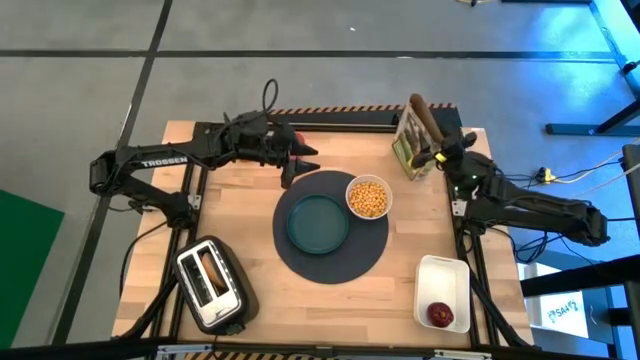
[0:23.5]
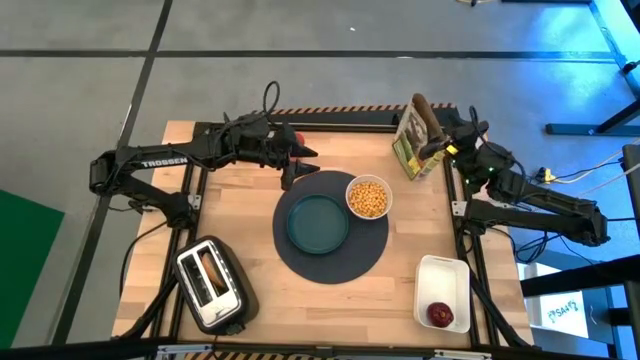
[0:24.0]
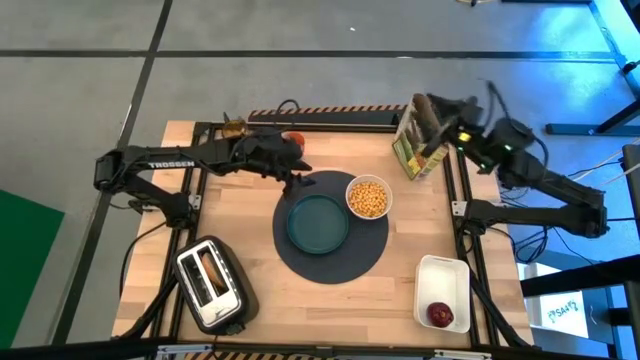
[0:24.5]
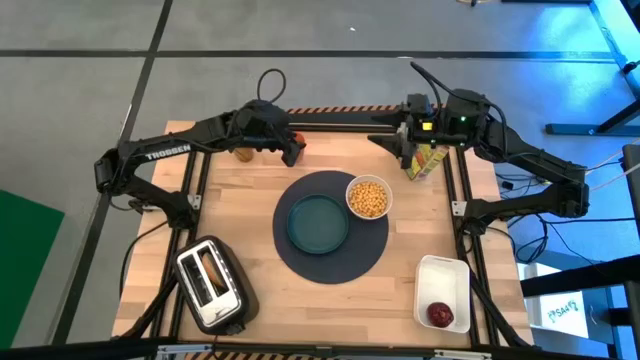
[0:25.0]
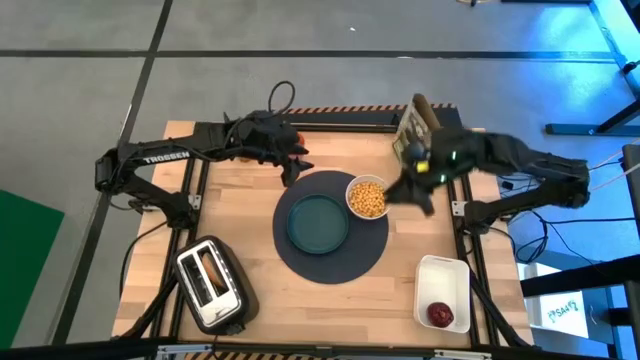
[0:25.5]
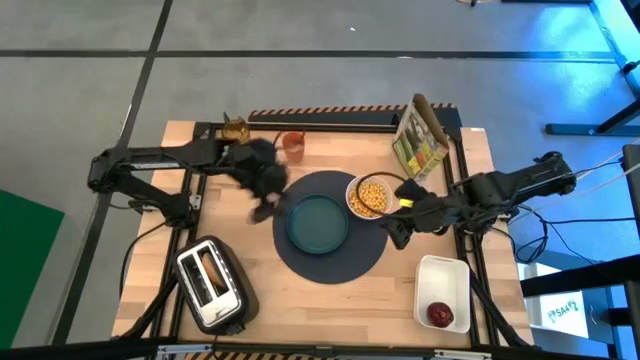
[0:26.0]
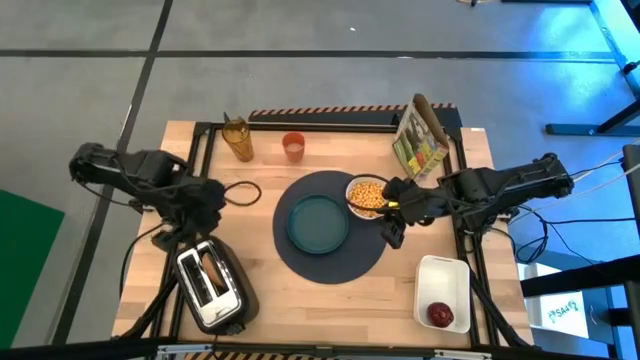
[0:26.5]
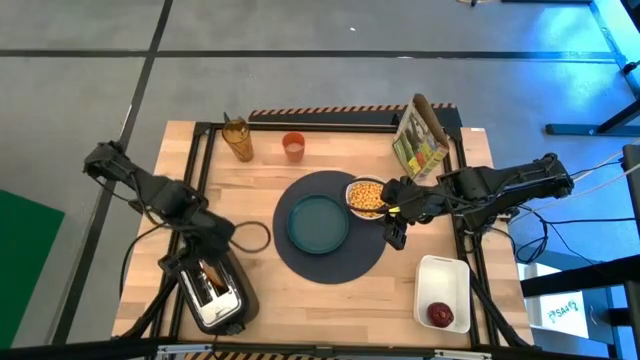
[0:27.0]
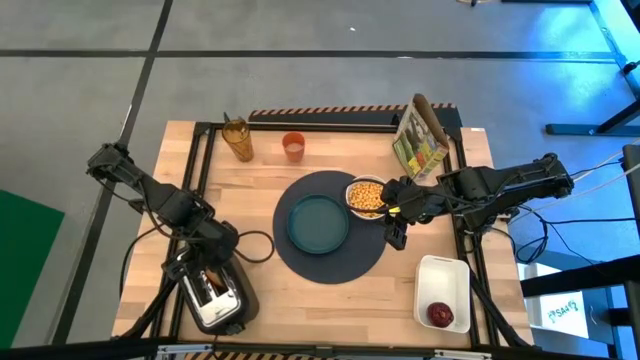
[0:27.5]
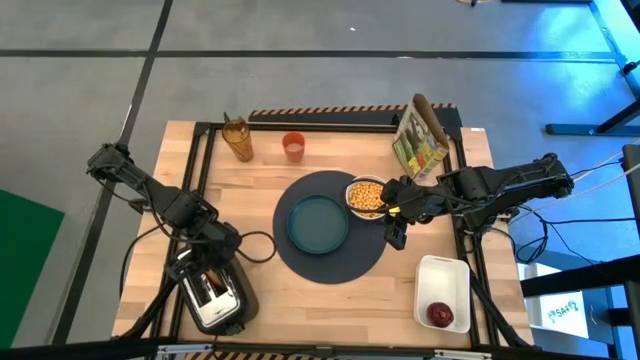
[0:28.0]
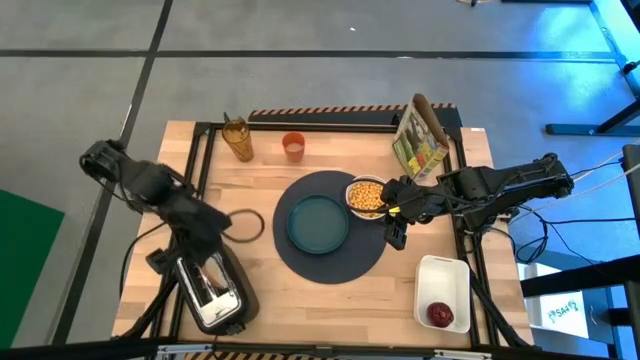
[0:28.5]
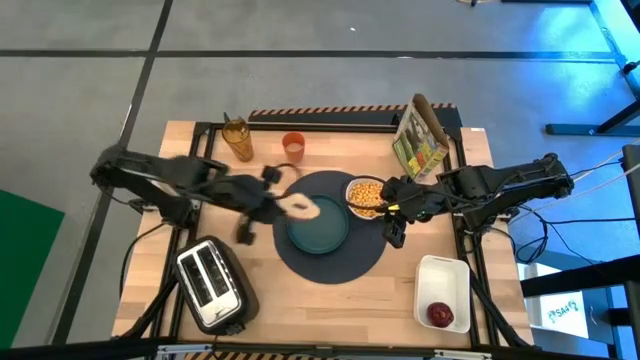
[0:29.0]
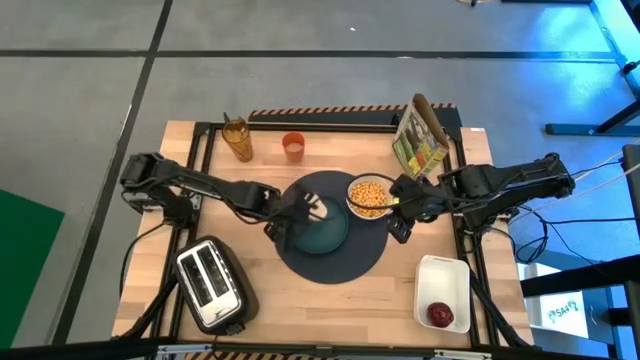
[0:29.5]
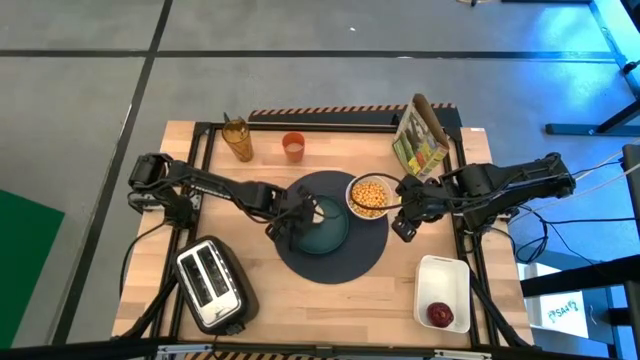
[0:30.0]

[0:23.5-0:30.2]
Task: Arrange a breakfast setting
Put the toasted bagel from the toaster on the green plate

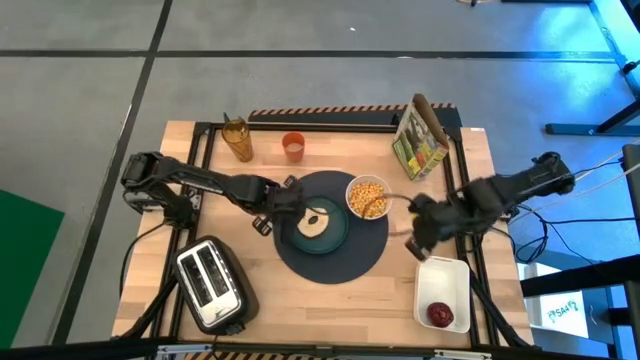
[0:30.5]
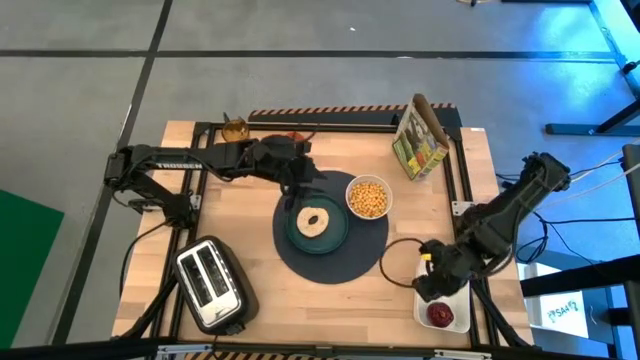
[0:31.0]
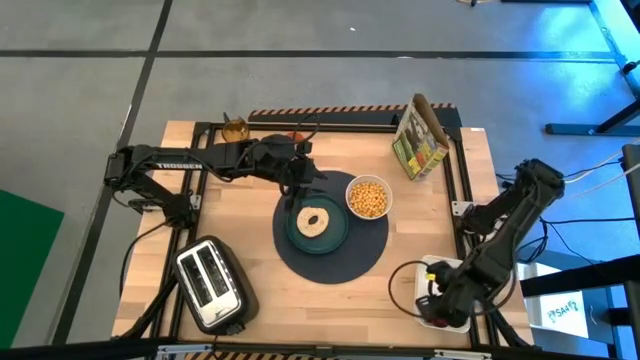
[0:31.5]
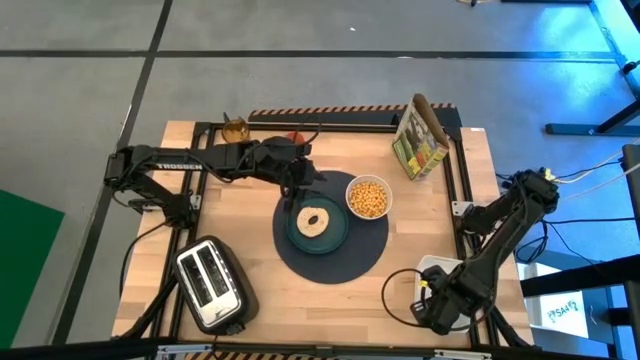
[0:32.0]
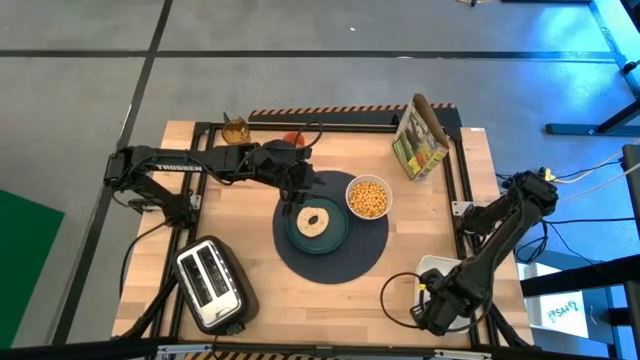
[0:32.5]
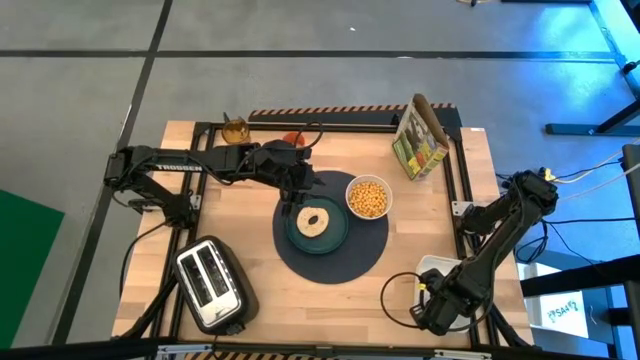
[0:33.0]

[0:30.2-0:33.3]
Put the red apple on the green plate to the right of the toasted bagel

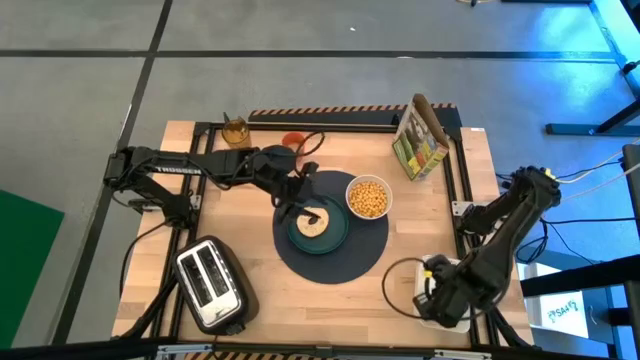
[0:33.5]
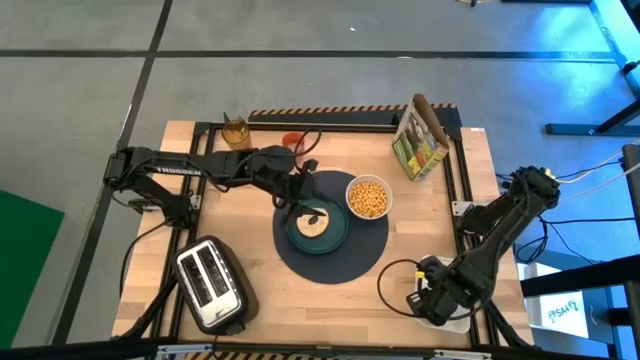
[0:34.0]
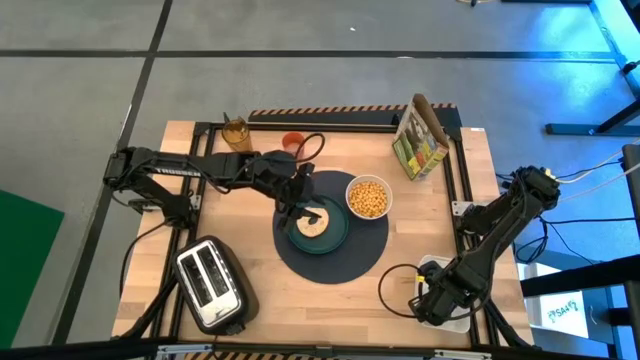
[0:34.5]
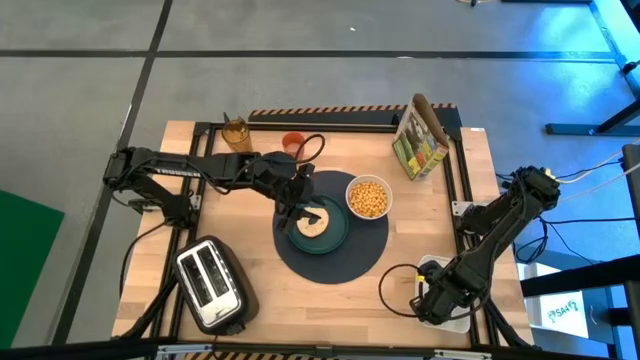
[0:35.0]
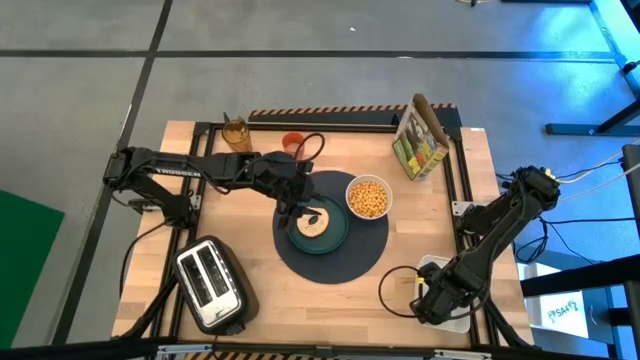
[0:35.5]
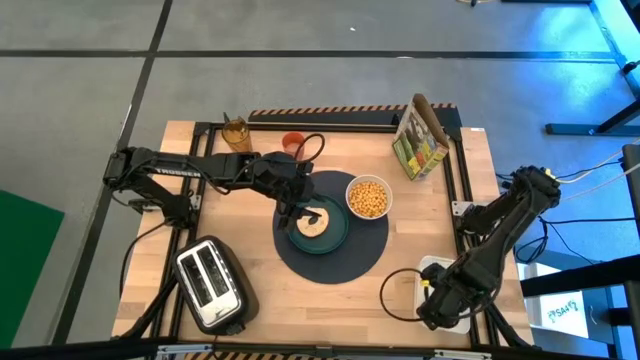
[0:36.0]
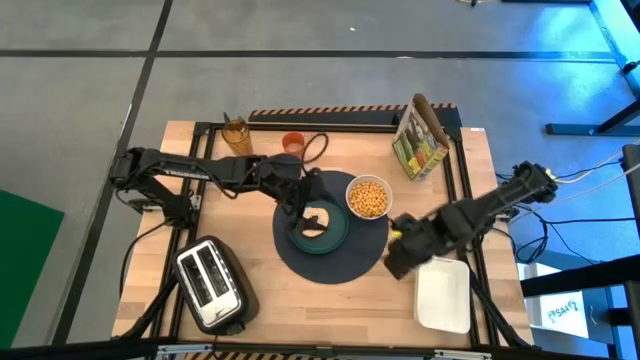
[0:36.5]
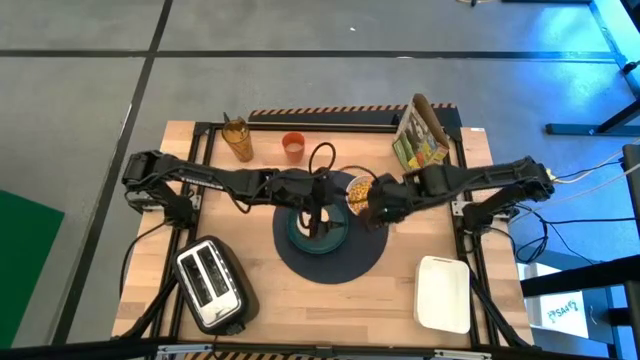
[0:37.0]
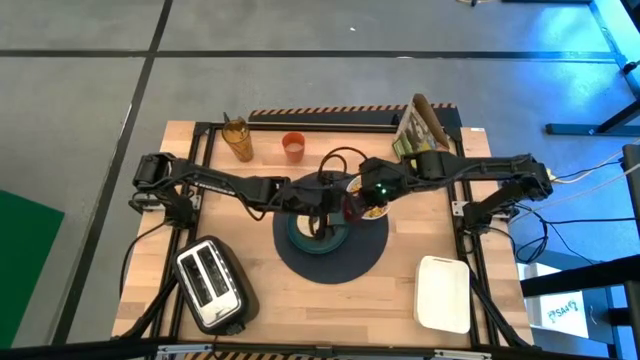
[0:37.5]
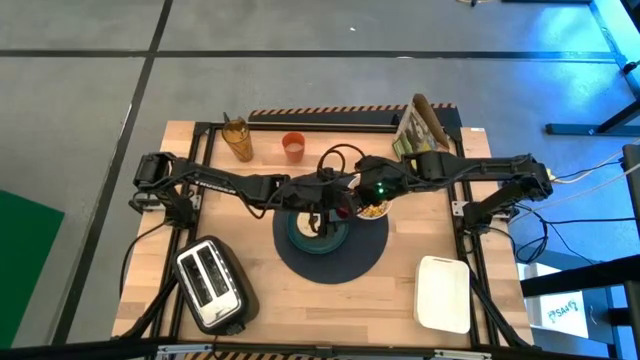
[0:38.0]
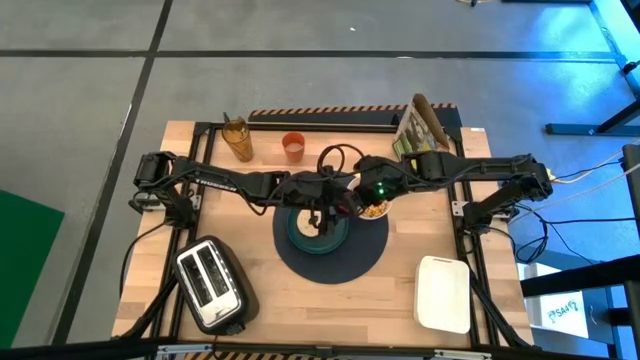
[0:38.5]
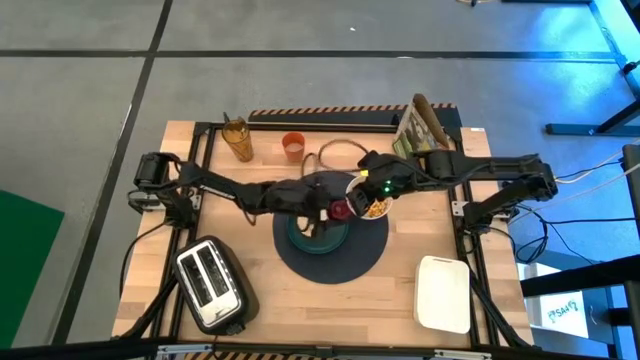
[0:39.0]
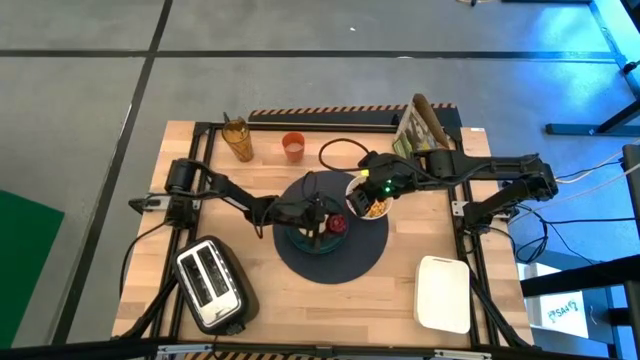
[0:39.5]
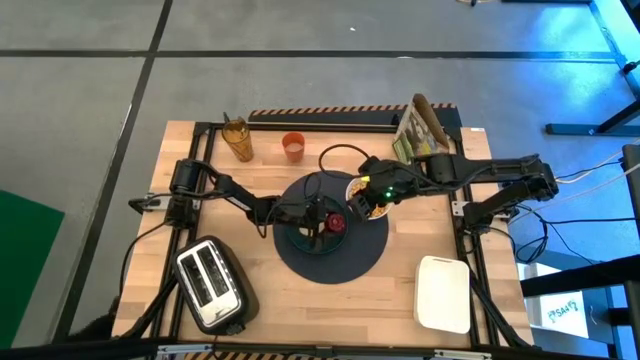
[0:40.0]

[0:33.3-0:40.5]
Put the red apple on the green plate to the right of the toasted bagel

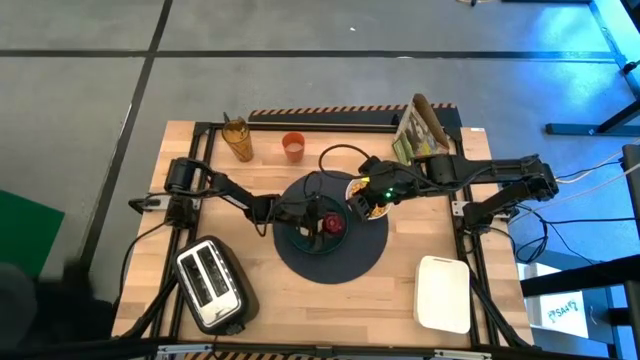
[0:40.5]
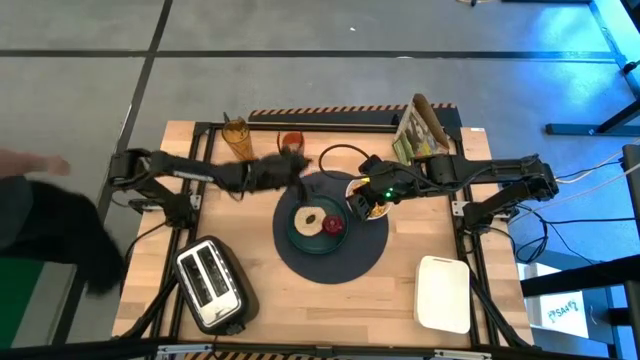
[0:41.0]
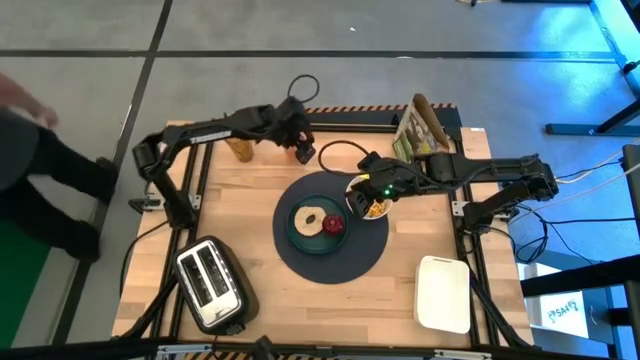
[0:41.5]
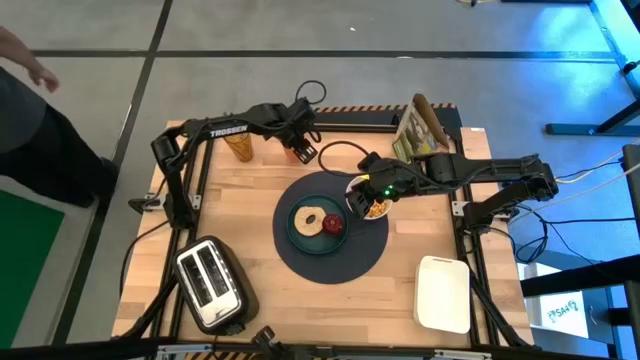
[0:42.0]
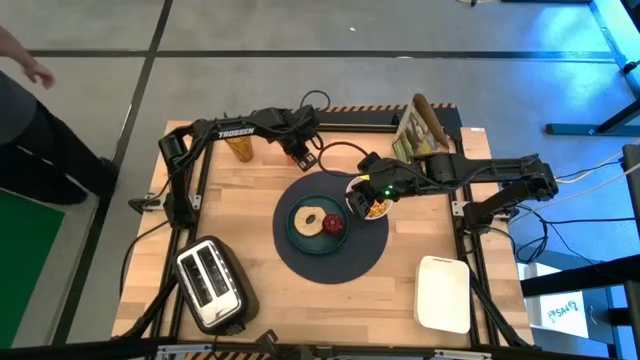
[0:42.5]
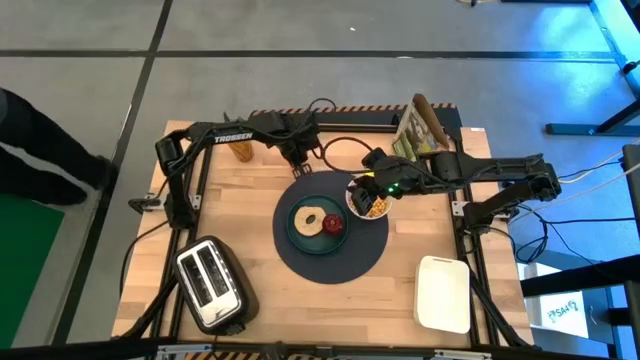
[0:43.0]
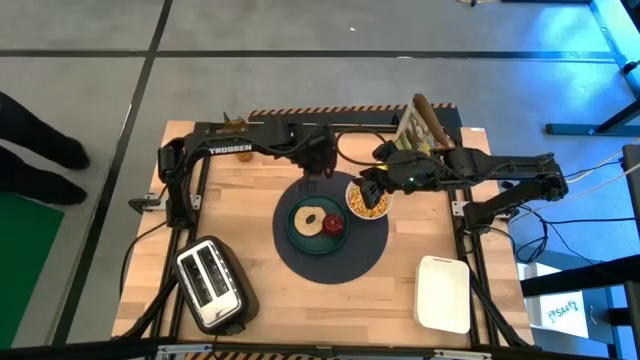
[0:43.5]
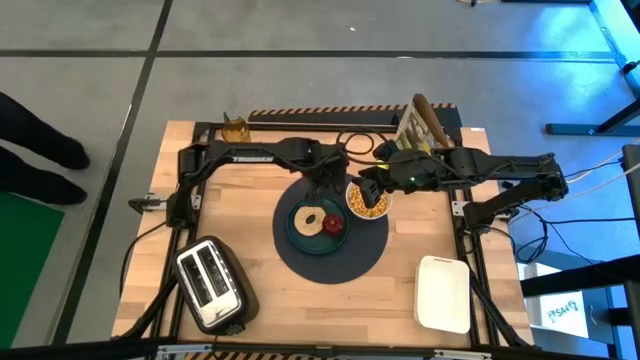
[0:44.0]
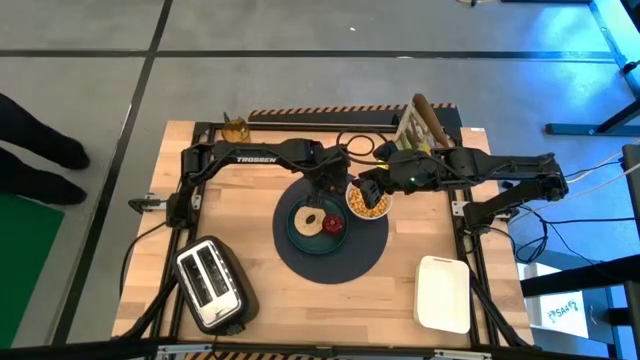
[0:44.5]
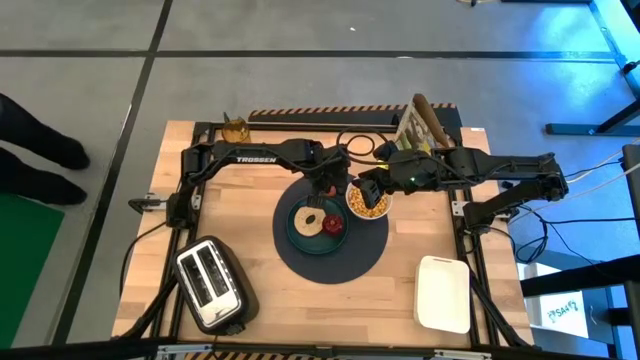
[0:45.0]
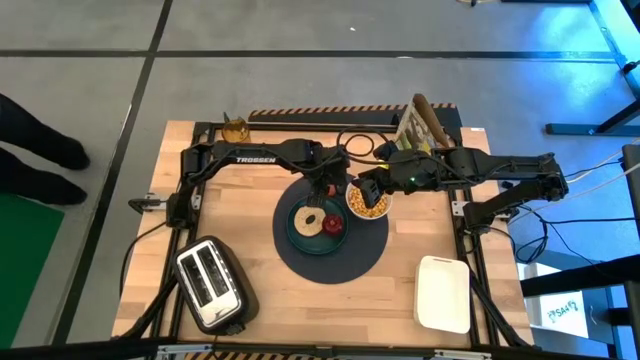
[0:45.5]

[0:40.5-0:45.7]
Put the orange cup with rice on the black tablemat to the top of green plate
